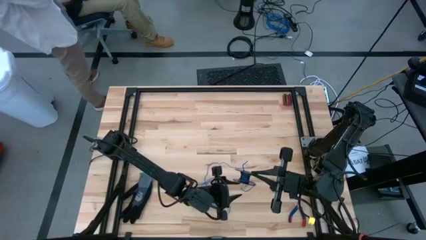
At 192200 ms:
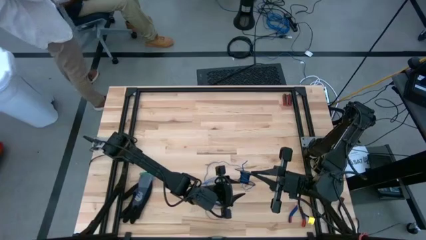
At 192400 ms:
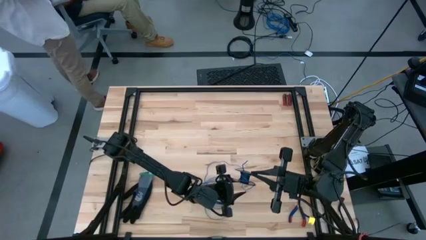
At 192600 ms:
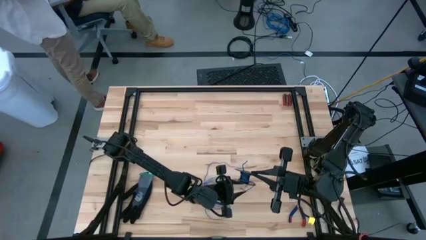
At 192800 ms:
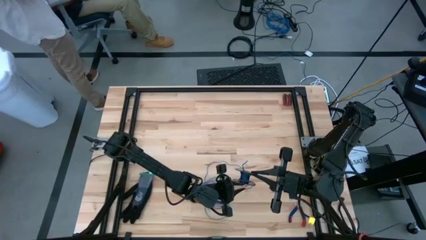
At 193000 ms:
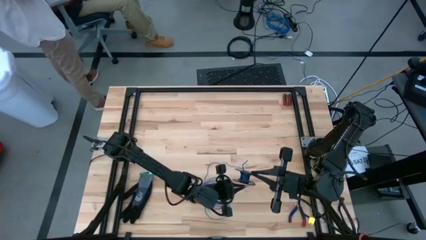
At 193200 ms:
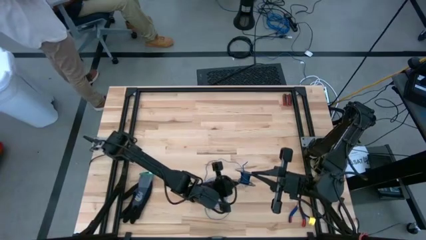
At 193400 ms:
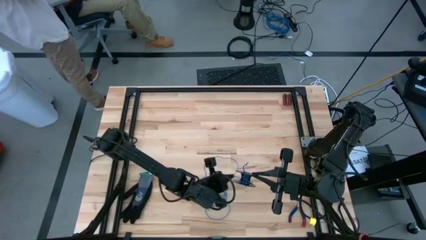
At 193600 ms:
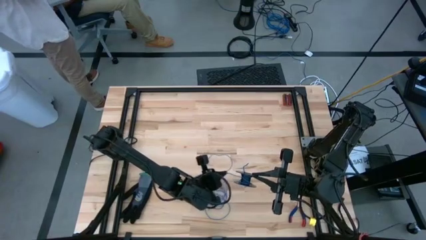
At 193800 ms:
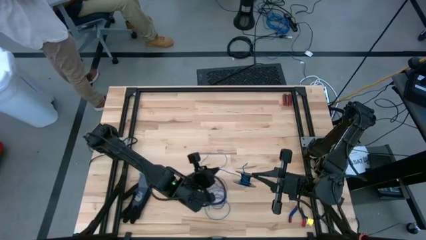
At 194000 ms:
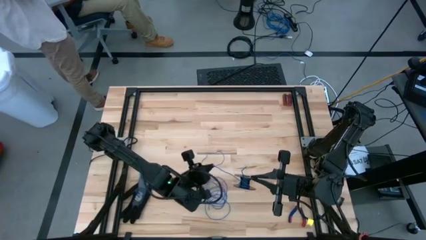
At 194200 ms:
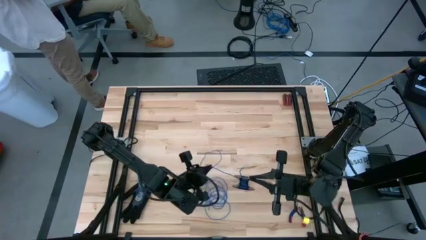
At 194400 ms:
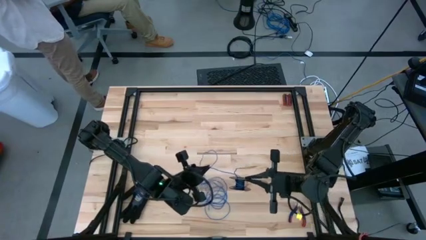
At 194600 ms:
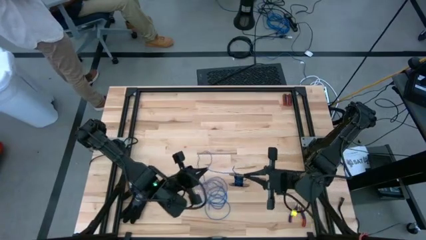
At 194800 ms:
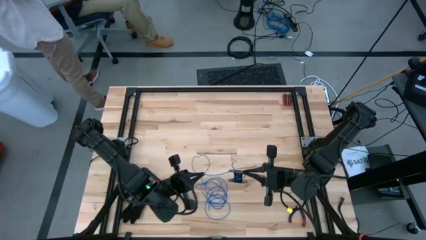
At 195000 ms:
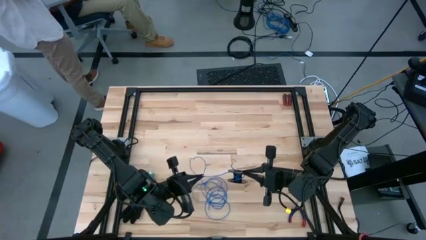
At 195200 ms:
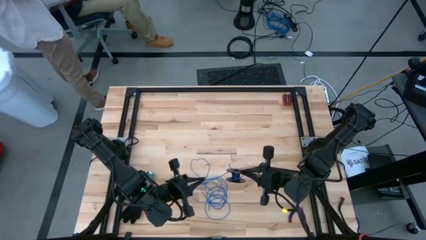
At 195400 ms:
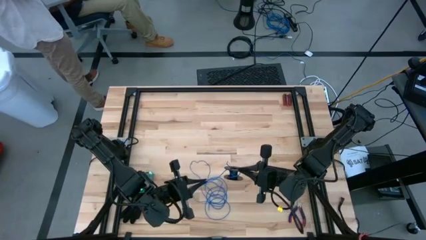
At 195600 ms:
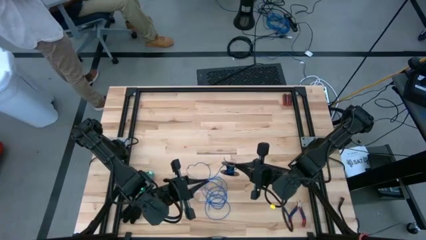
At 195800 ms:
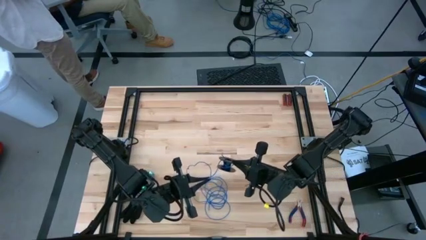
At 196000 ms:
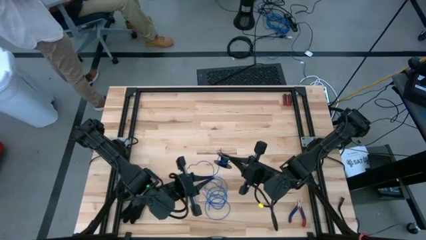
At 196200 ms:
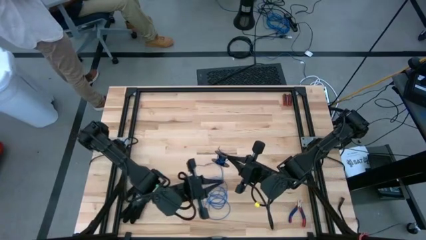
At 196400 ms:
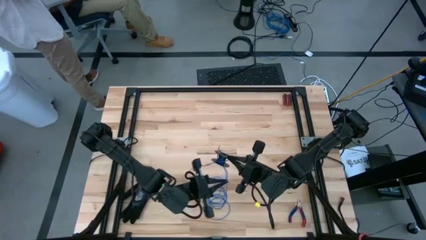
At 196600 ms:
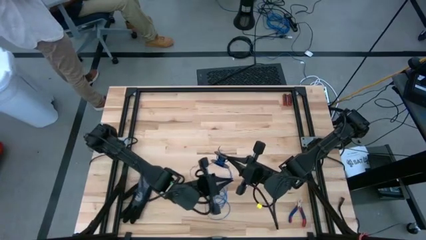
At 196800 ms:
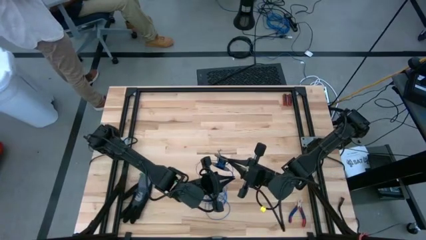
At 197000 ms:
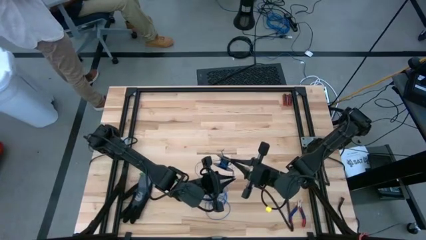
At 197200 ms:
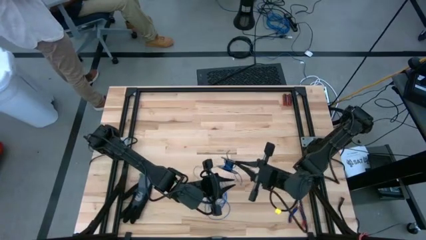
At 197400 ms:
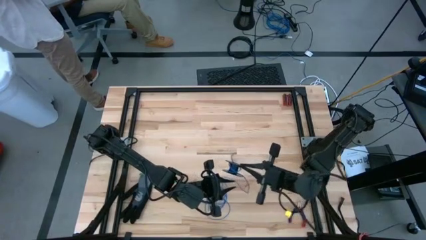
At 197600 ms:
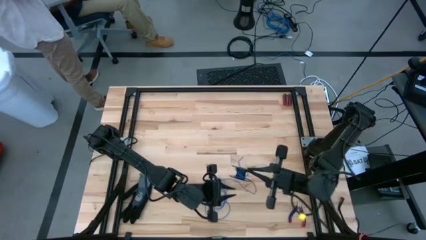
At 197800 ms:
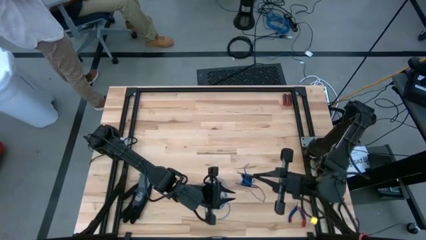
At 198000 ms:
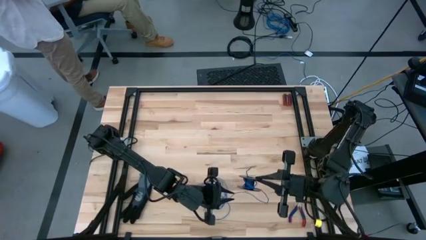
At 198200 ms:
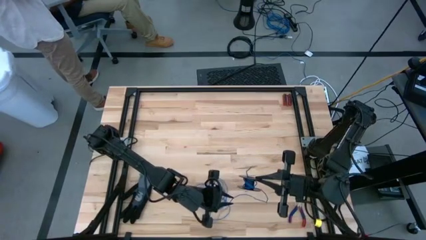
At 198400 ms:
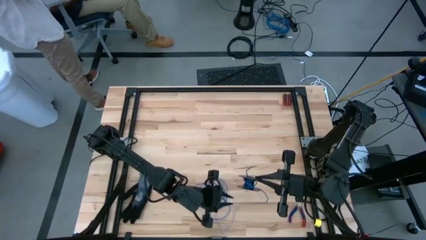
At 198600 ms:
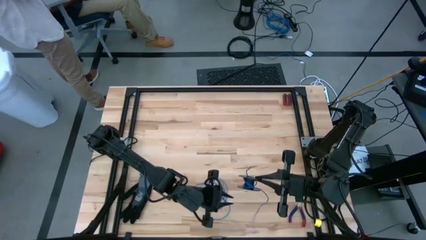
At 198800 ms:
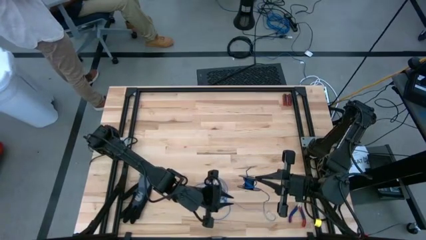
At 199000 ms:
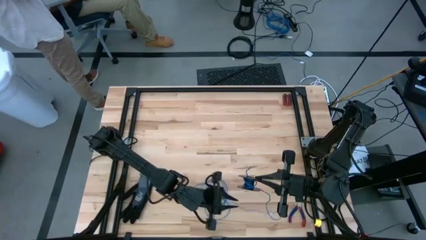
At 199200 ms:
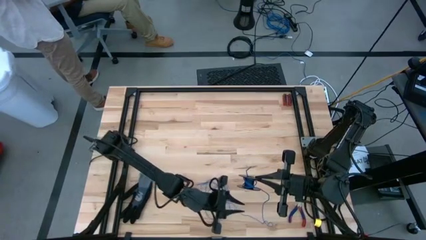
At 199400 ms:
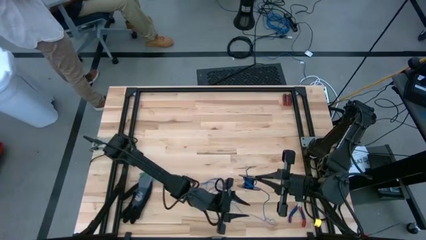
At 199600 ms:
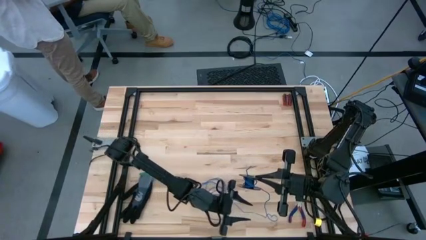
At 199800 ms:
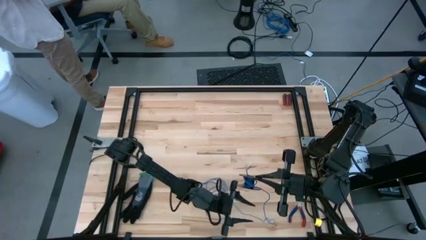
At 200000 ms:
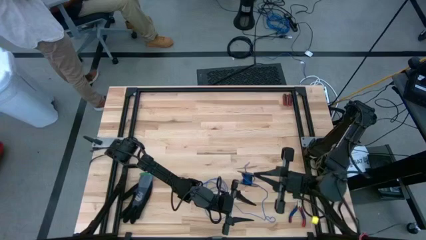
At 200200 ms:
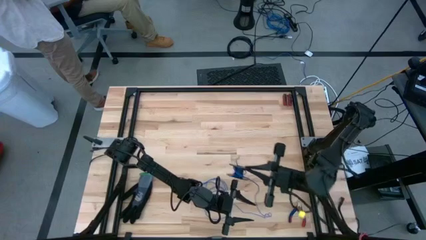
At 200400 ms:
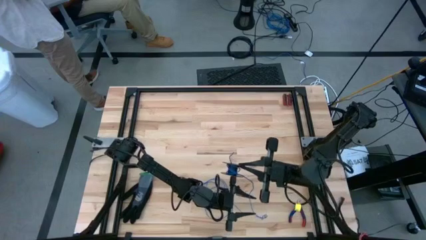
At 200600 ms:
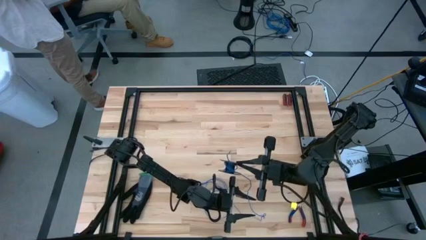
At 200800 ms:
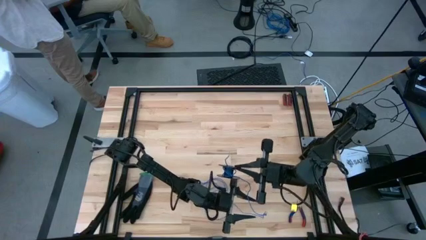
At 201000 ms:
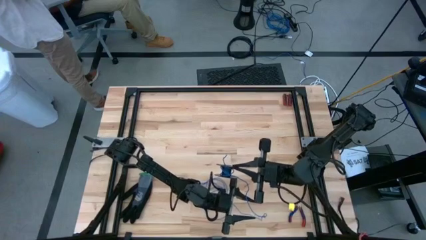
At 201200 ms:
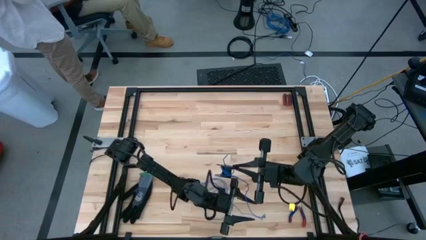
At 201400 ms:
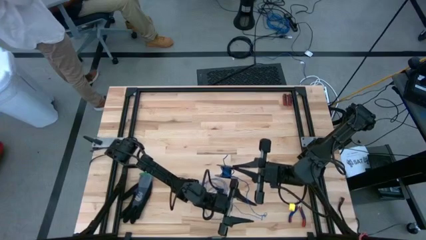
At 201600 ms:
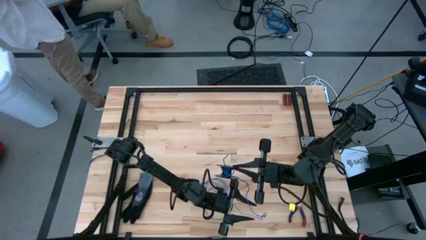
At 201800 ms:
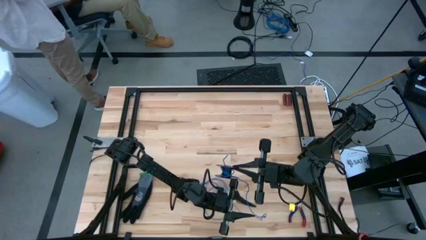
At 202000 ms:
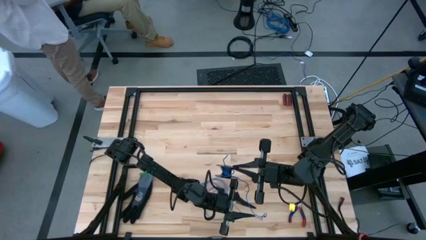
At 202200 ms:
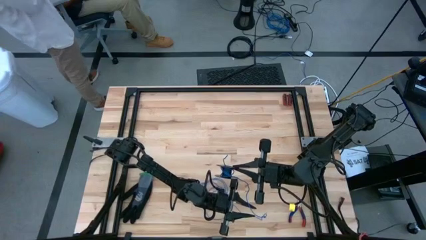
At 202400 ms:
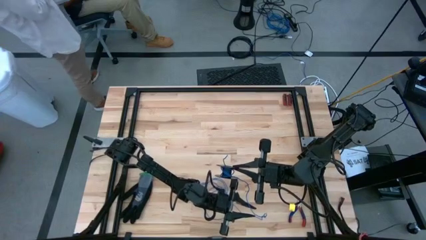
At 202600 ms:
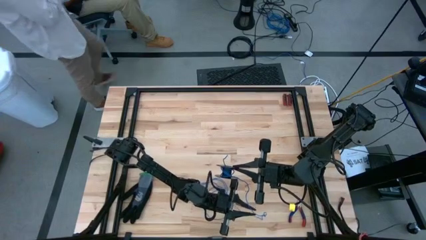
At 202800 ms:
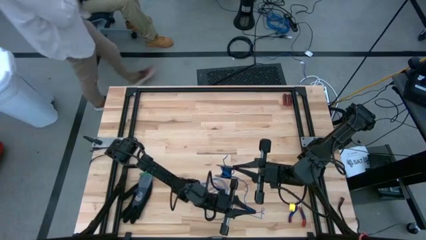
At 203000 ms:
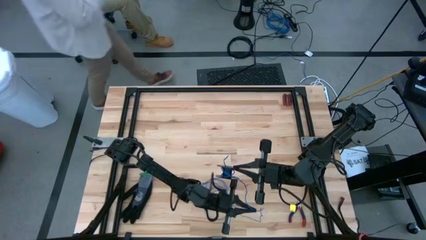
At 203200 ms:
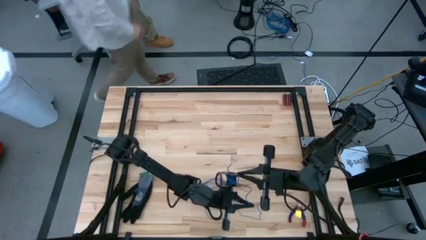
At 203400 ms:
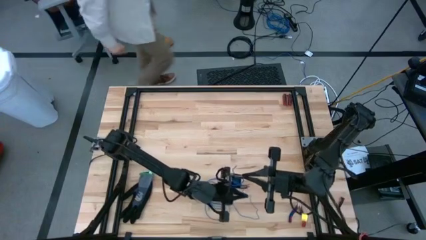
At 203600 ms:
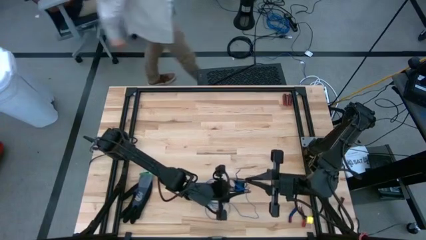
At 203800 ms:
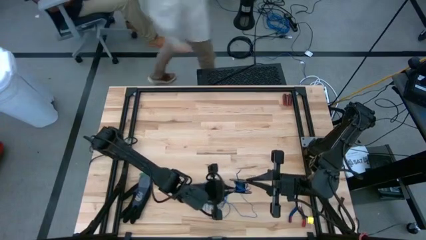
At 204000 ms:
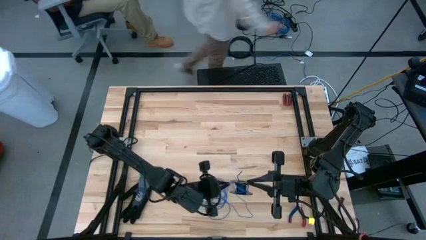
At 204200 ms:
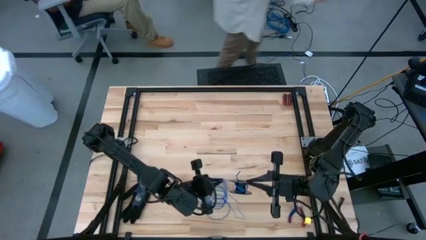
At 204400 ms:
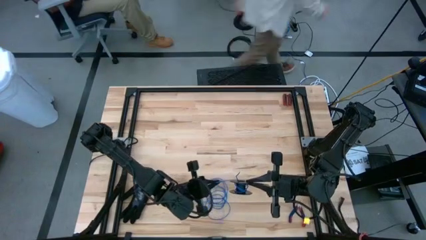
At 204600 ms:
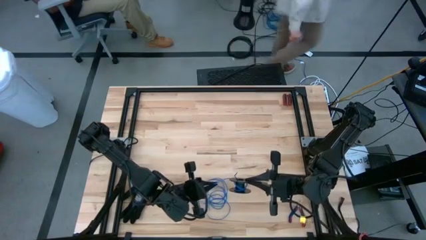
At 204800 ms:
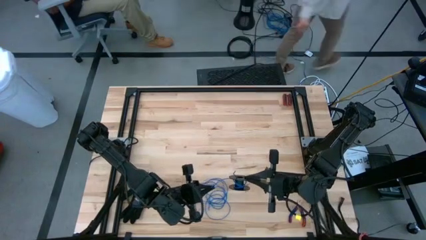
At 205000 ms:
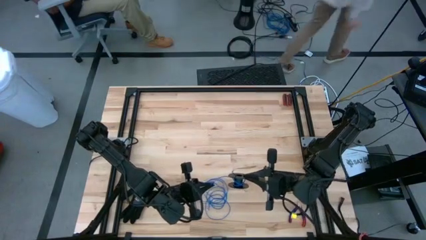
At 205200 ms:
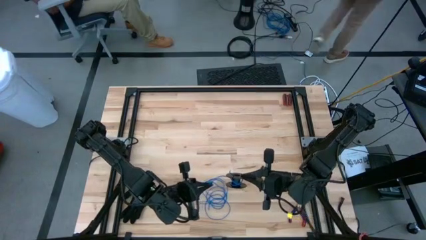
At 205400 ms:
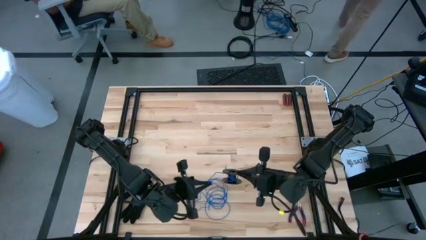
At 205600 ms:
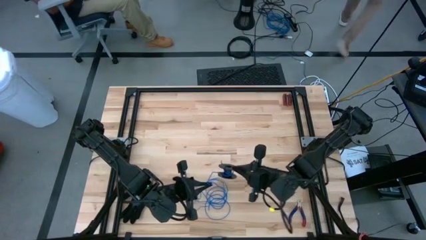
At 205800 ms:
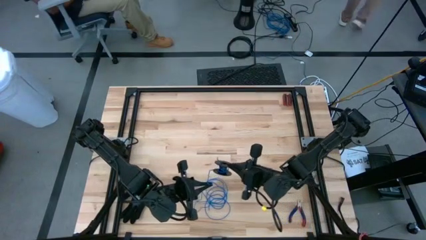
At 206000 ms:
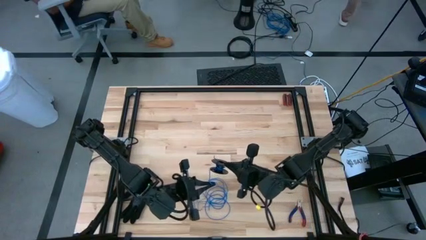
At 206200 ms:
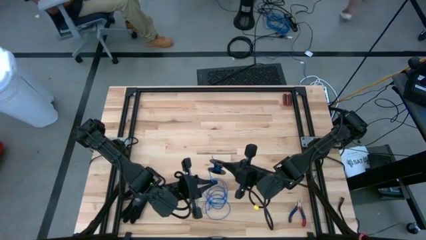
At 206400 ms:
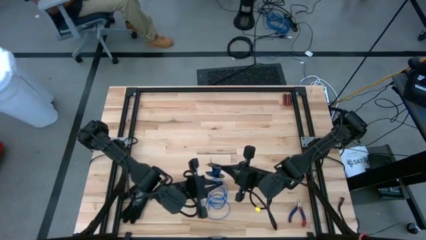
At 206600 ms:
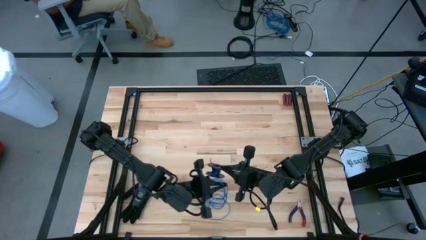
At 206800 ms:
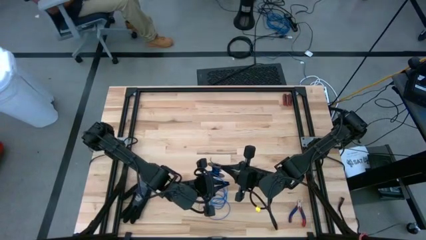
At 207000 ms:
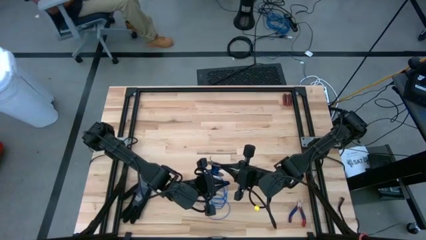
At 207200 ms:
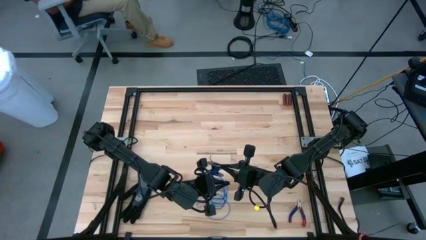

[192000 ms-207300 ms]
Task: Coil cords
Coil the blue wire onto the spool

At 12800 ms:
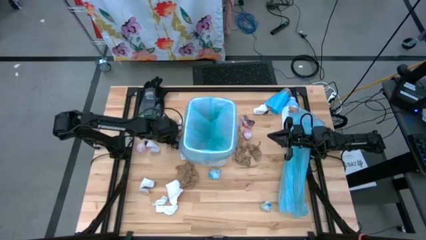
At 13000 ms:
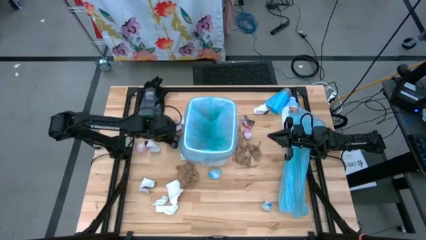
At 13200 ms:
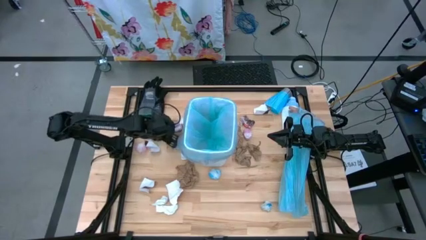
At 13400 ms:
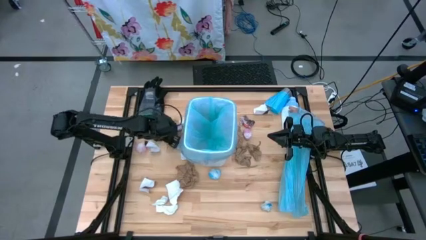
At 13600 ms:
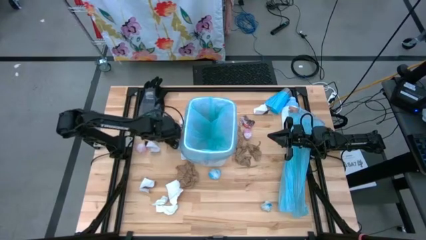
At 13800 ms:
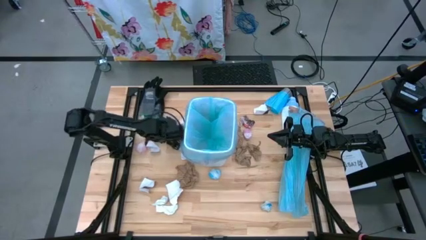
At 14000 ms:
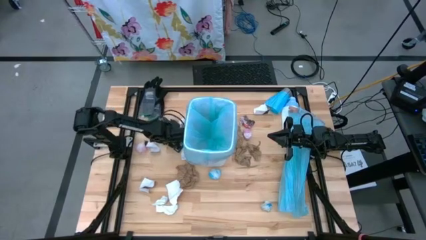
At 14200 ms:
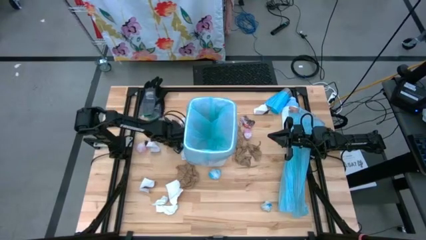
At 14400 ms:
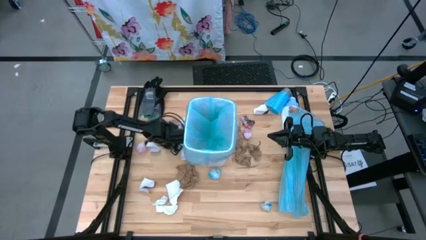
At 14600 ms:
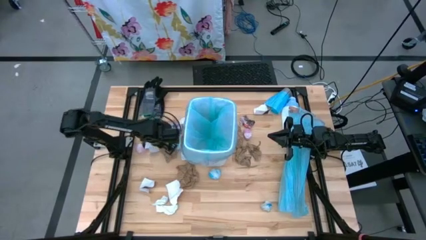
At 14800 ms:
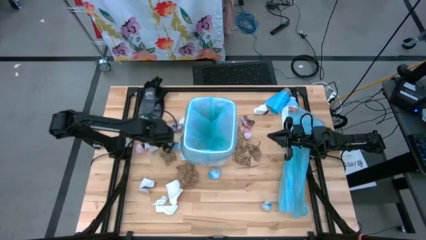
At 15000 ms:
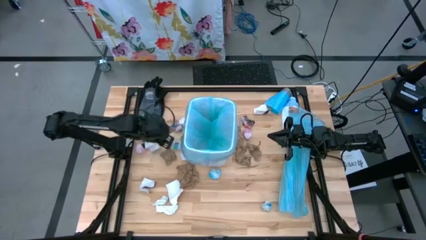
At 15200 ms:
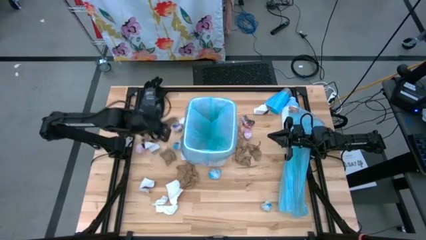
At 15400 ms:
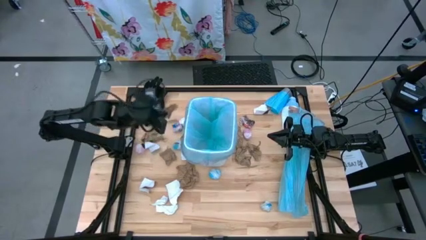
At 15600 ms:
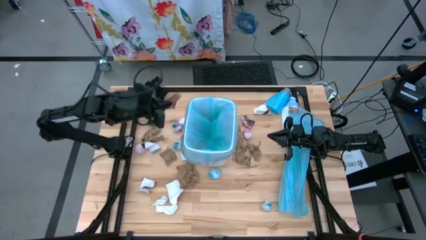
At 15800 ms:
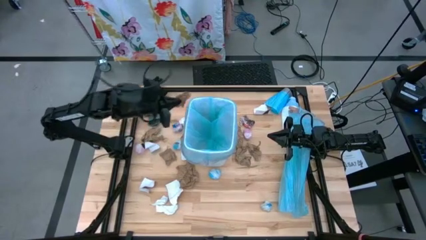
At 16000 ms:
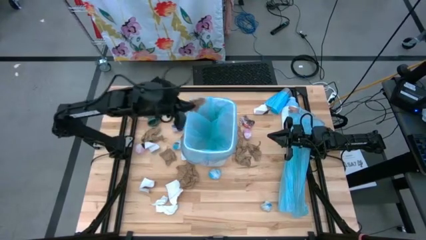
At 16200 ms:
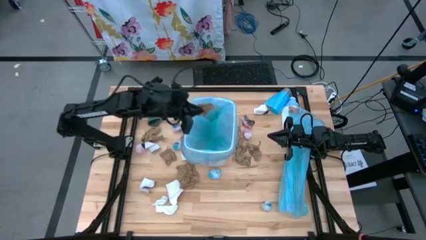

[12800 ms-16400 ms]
Task: place trash/remove bag and relplace
Put the brown napkin into the trash bin
